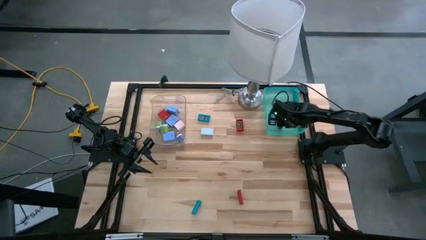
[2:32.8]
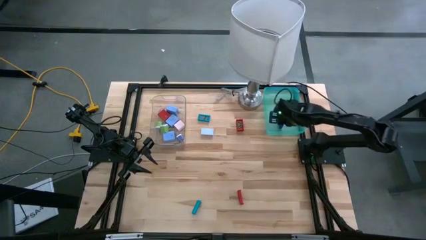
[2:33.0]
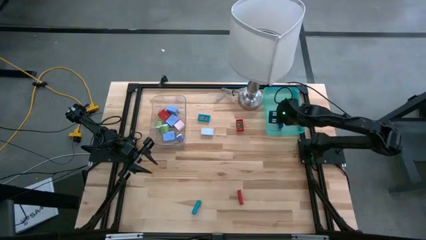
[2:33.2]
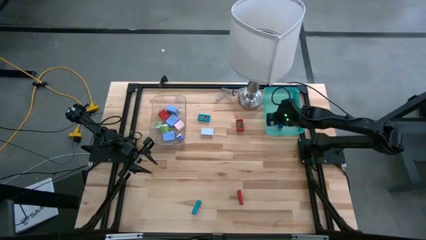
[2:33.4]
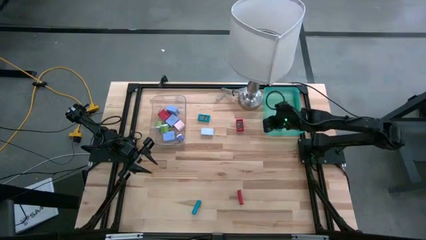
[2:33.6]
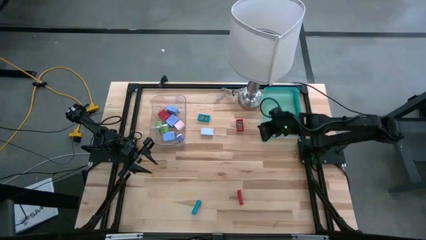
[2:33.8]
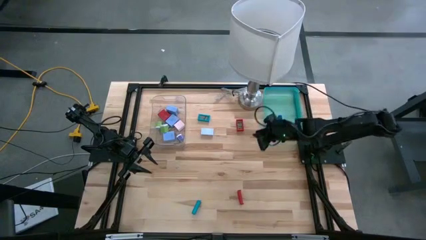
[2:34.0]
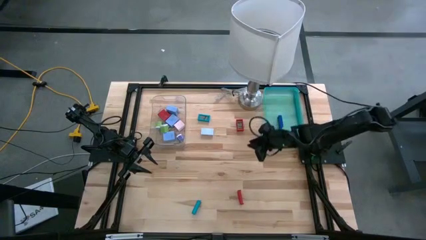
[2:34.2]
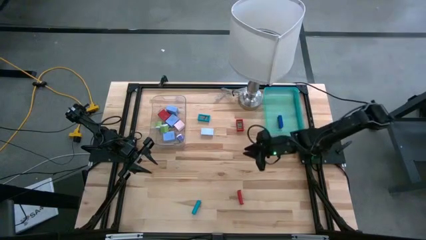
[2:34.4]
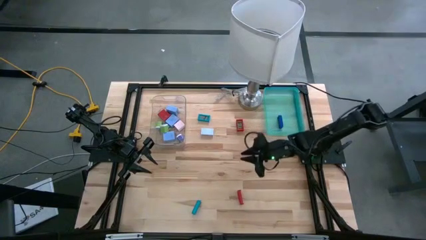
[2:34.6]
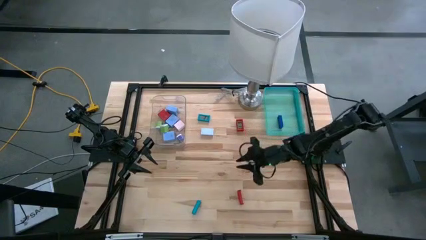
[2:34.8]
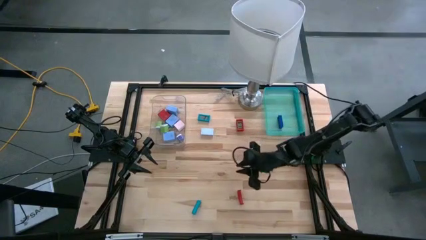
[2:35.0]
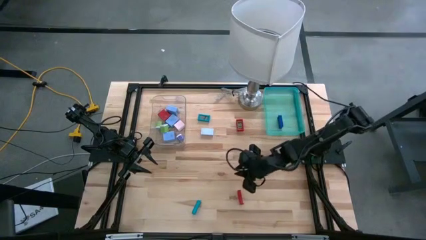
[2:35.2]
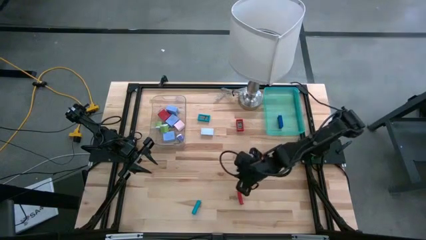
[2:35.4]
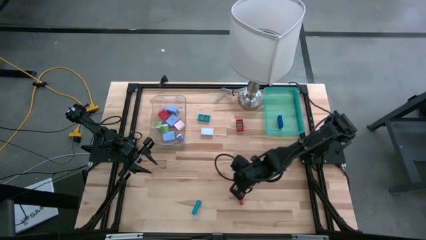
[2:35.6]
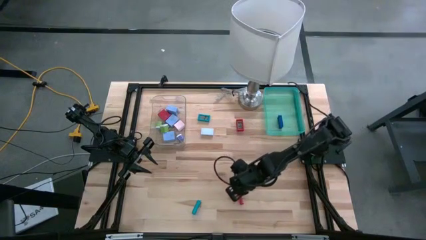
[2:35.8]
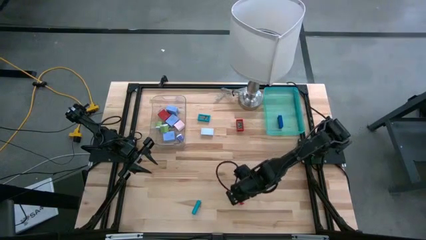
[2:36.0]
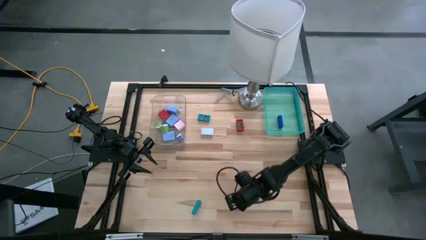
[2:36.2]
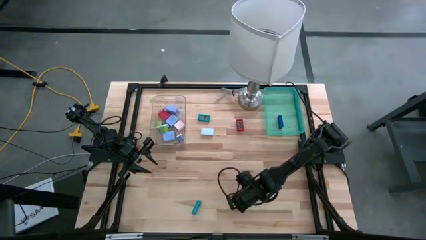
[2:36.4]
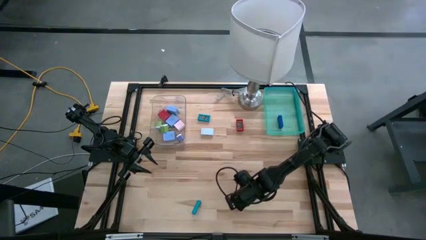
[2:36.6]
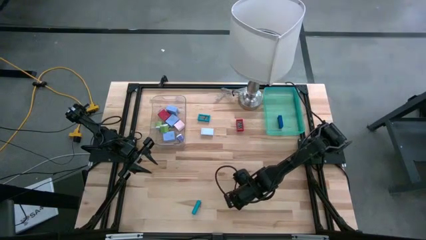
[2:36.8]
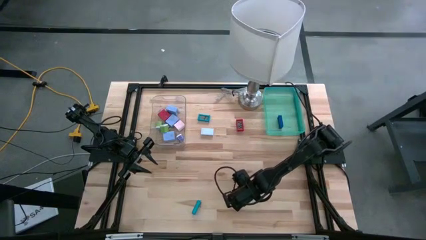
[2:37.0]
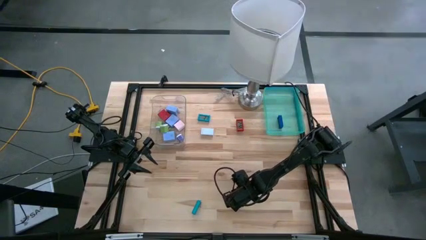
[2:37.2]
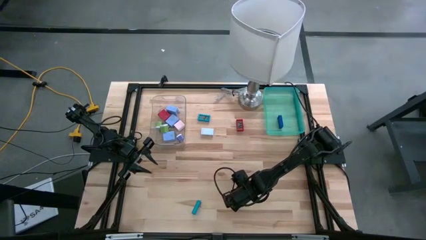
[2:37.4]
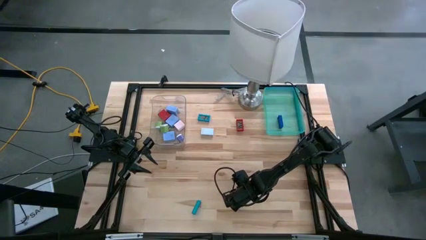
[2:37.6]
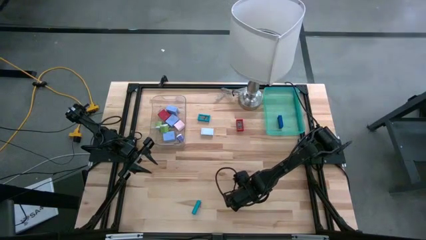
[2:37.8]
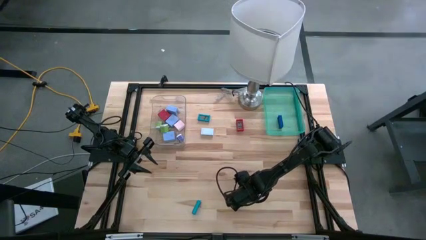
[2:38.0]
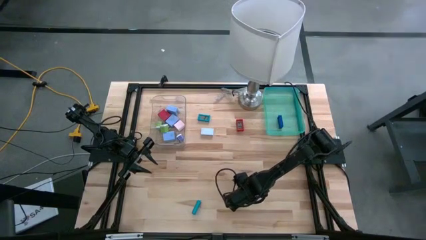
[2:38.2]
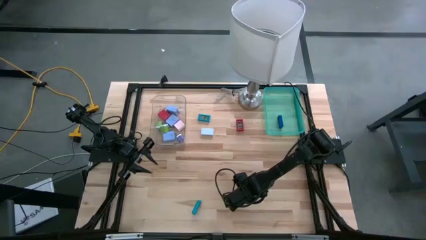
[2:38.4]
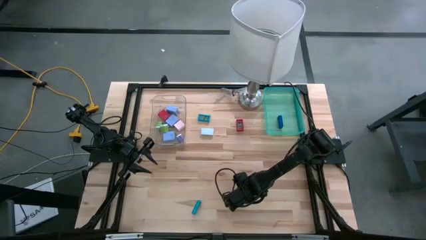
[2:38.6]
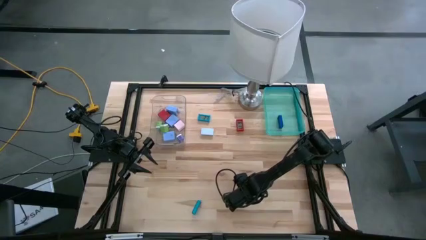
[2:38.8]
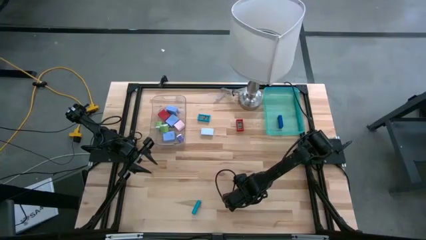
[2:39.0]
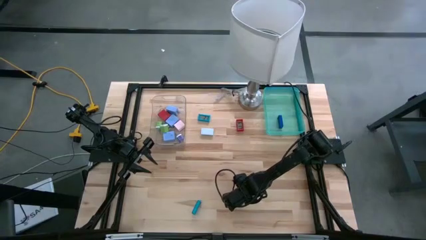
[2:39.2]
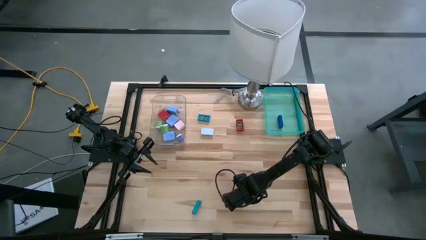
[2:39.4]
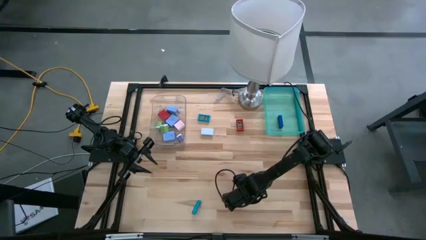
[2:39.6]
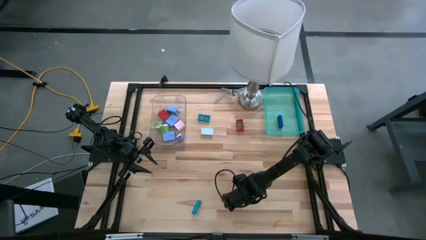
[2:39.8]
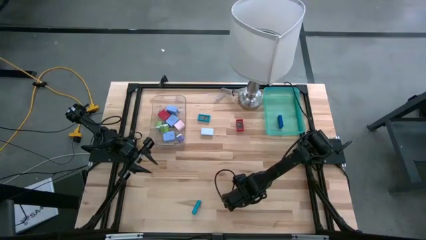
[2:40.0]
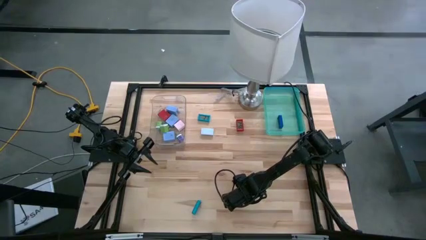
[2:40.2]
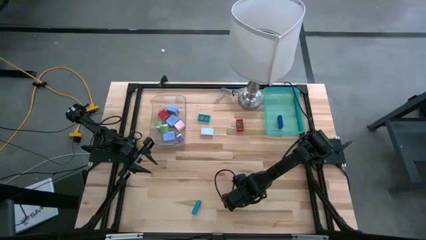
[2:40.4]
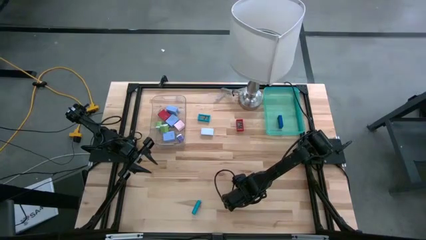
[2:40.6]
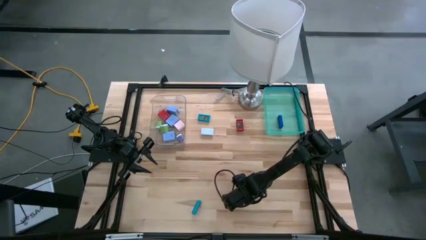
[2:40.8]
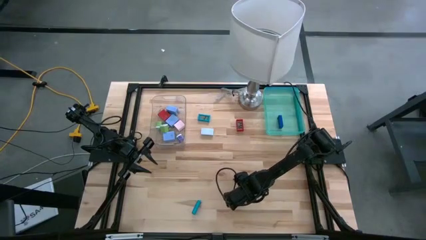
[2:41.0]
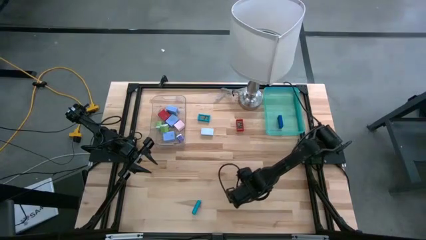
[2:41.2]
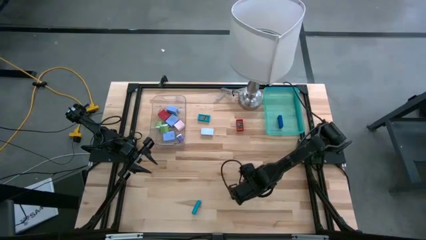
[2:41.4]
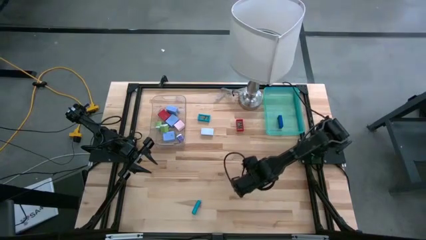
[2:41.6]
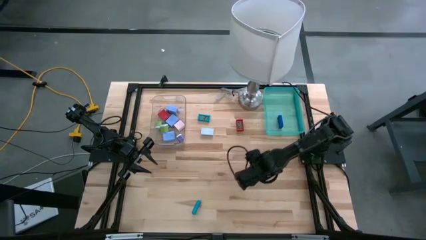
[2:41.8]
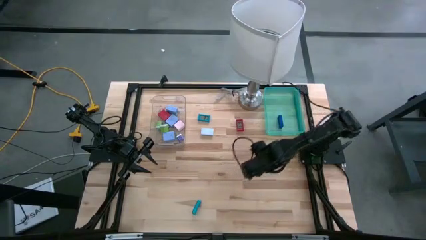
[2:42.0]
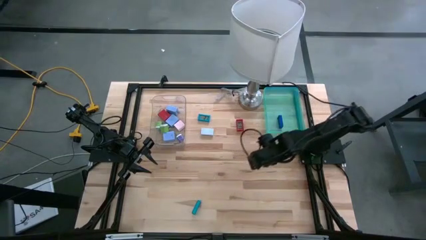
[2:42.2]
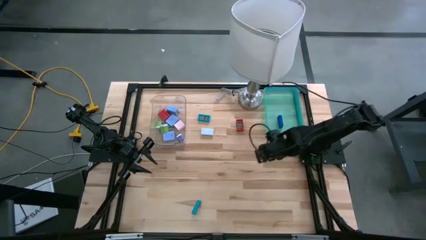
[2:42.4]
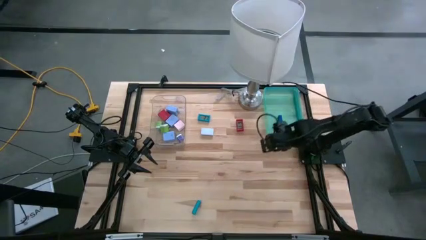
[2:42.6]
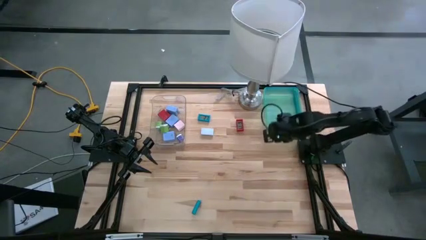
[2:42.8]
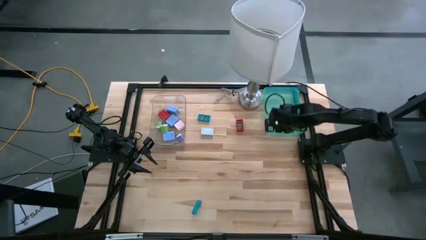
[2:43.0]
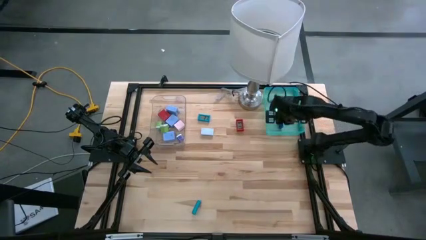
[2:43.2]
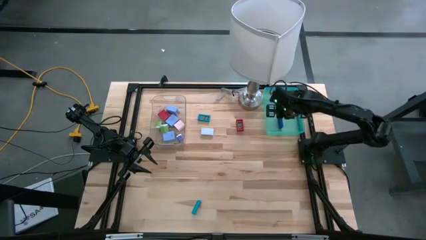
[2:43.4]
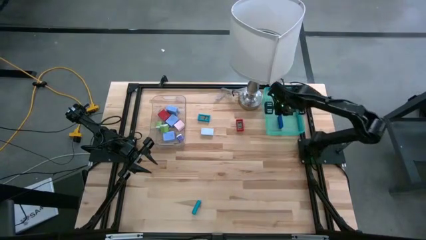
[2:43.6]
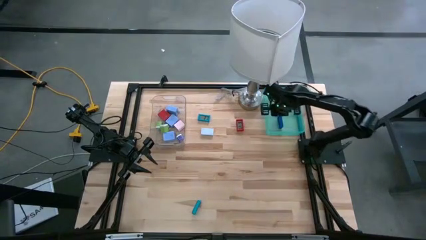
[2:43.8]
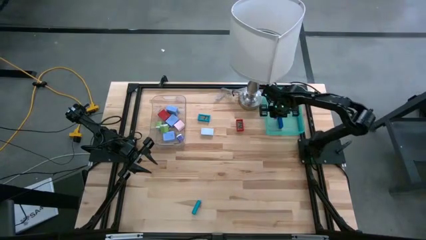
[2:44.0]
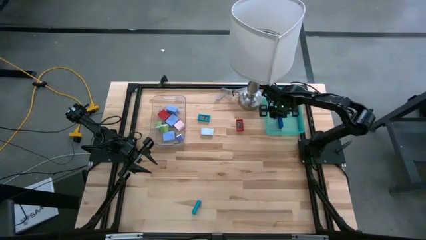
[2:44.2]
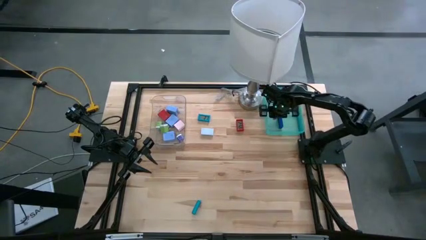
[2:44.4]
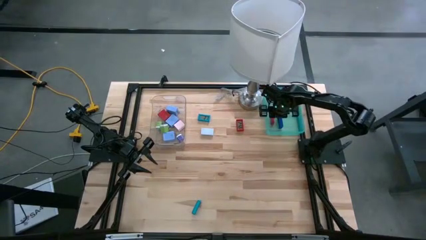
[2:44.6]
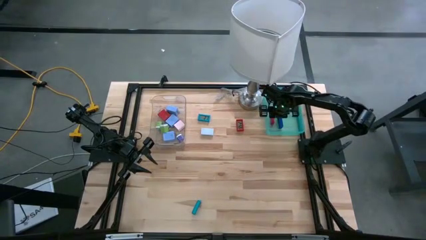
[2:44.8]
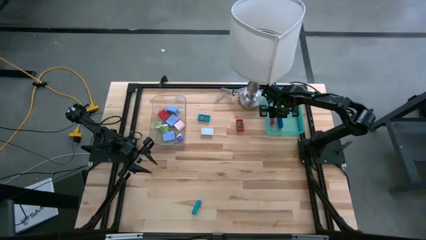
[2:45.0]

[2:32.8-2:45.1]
Task: Pick & Place Office items
Put the bottom red mini digital clock into the light blue bin

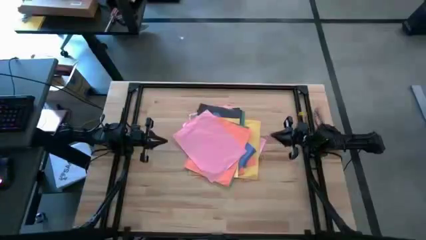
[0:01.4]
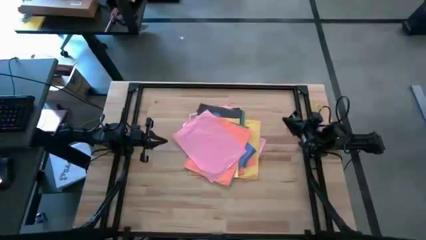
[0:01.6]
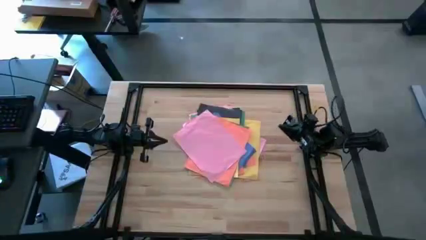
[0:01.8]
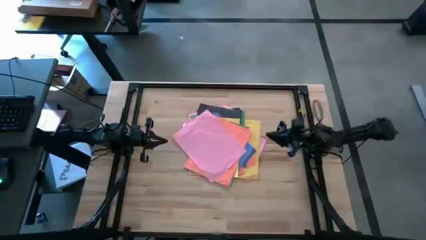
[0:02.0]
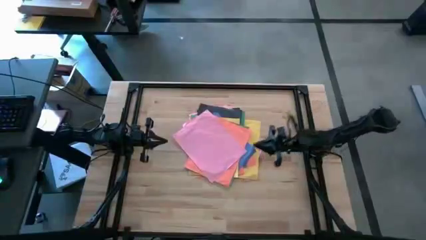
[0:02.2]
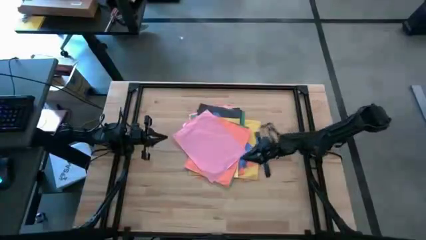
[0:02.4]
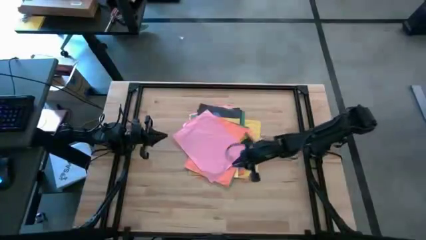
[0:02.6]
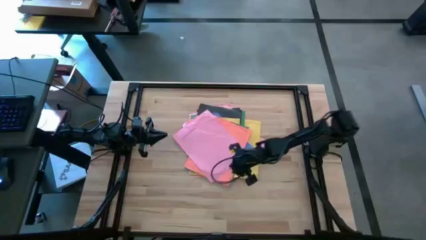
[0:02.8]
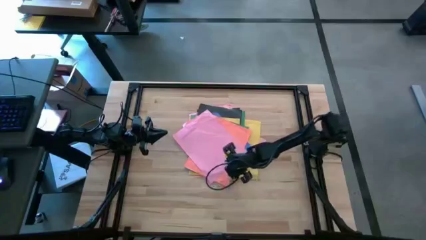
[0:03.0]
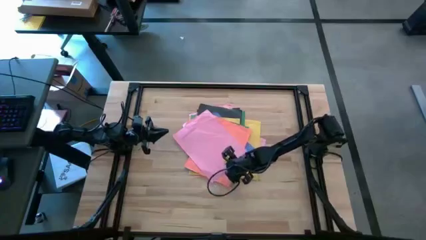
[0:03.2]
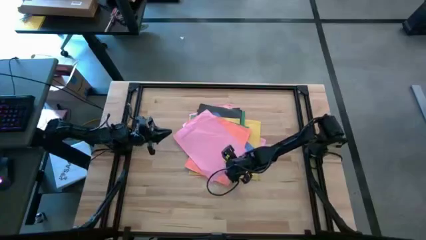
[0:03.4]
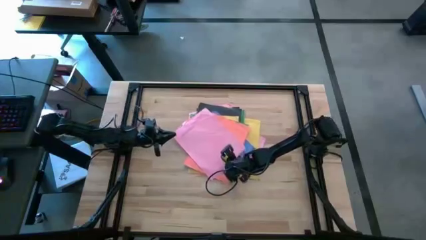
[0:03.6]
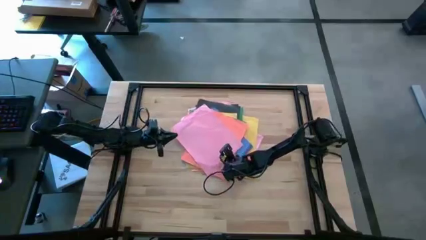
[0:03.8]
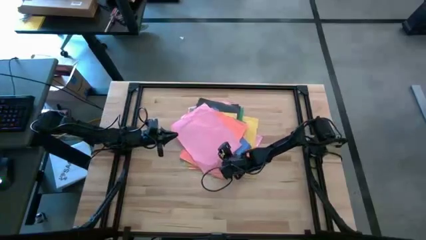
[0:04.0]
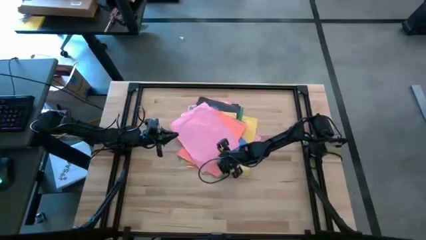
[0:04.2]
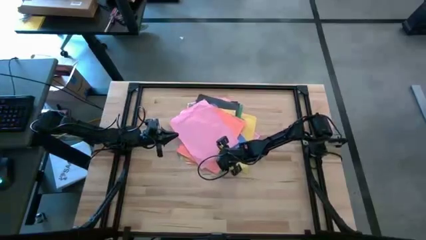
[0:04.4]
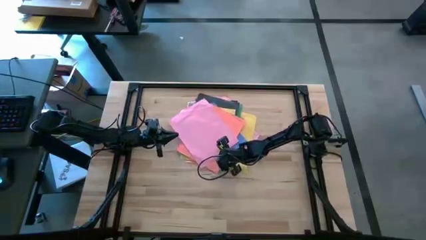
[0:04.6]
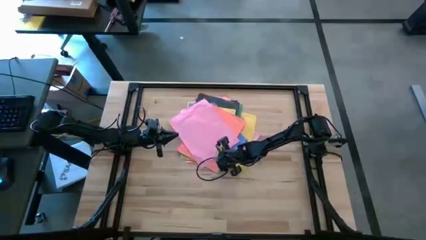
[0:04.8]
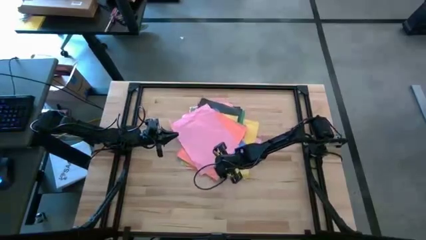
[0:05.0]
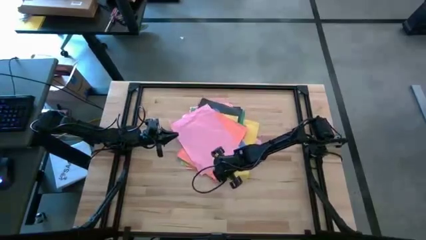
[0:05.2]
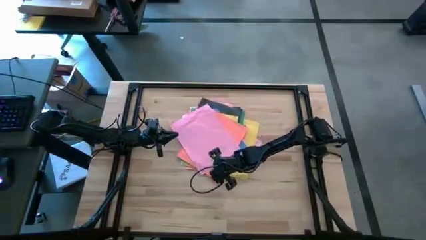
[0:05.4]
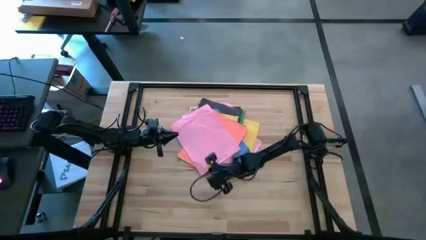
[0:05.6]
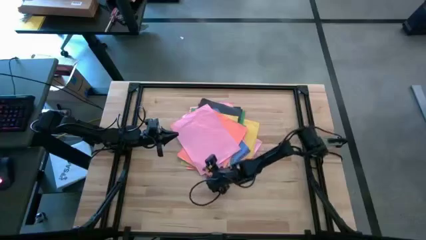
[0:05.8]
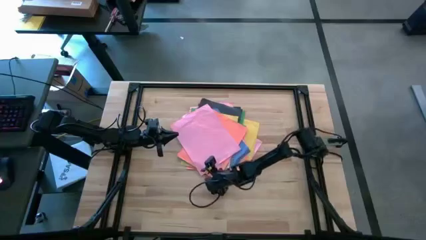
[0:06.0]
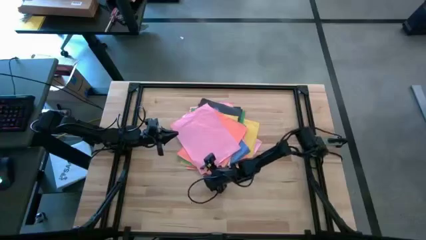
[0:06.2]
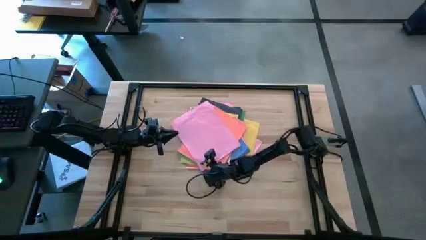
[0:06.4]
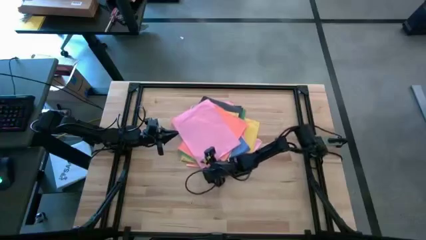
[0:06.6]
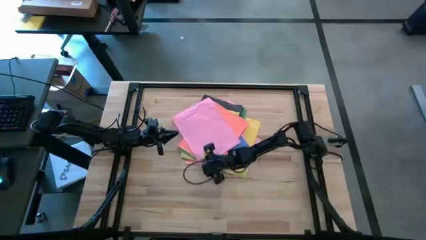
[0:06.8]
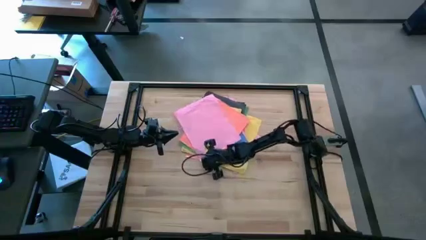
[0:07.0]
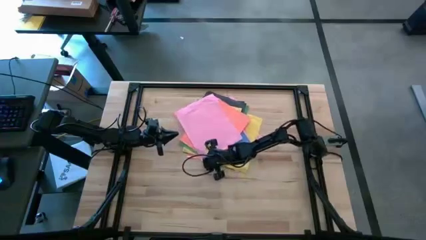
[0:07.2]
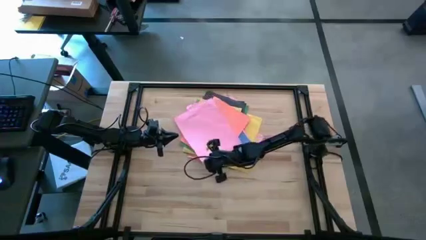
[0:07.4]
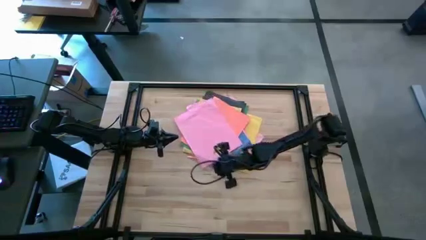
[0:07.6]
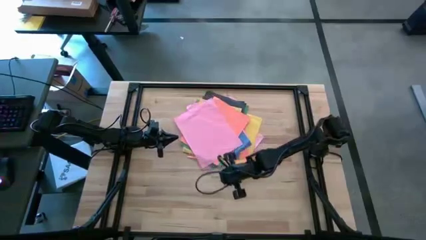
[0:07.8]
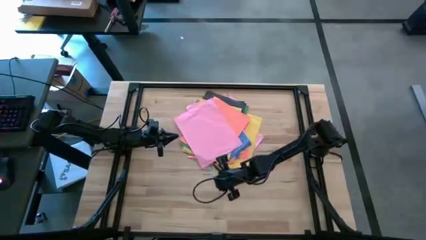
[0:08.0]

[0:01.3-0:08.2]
Task: Organize paper
Move the pink paper to the lower right of the table
